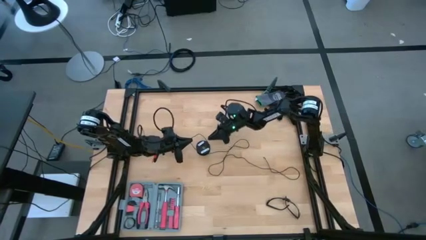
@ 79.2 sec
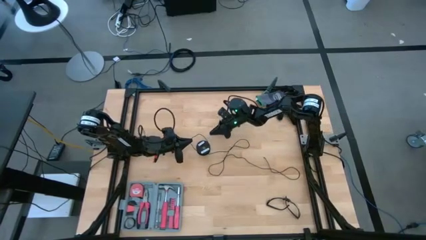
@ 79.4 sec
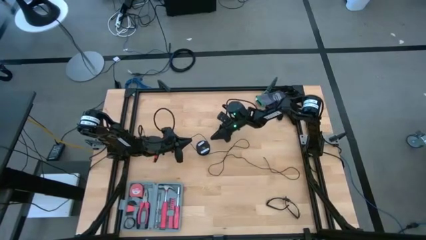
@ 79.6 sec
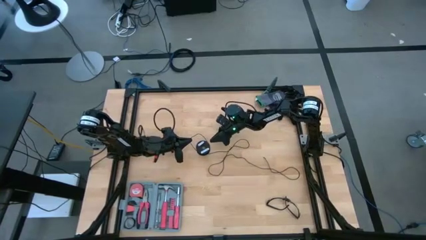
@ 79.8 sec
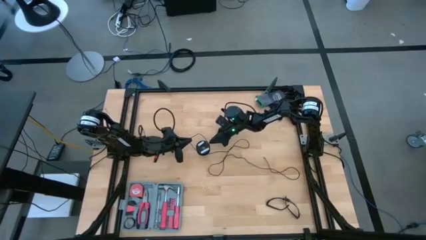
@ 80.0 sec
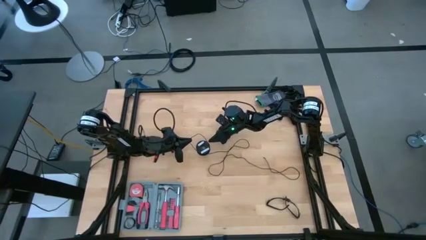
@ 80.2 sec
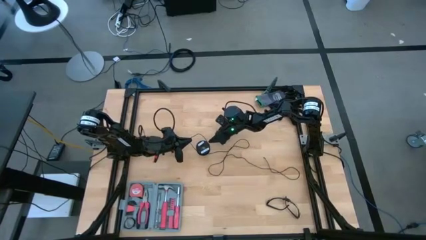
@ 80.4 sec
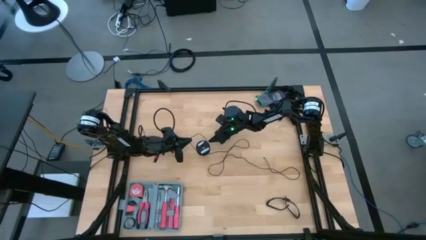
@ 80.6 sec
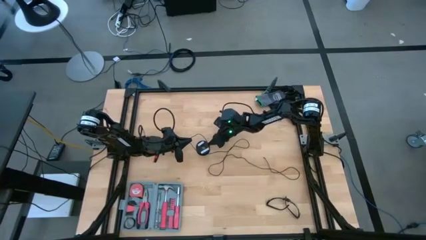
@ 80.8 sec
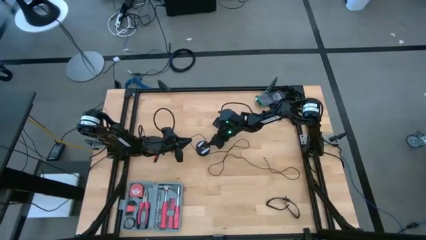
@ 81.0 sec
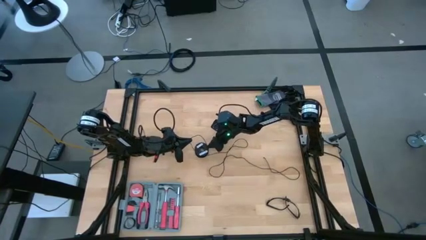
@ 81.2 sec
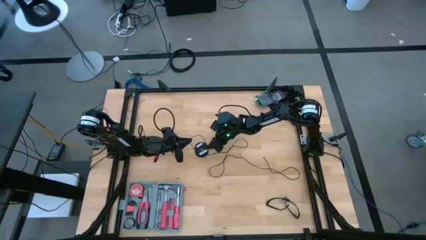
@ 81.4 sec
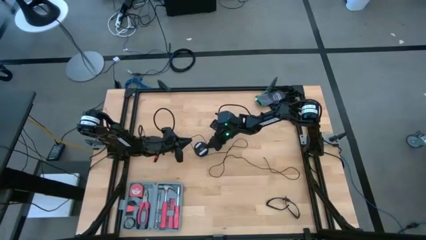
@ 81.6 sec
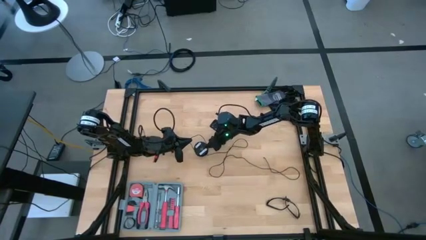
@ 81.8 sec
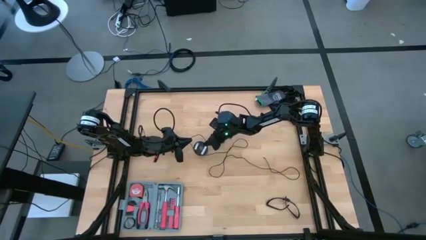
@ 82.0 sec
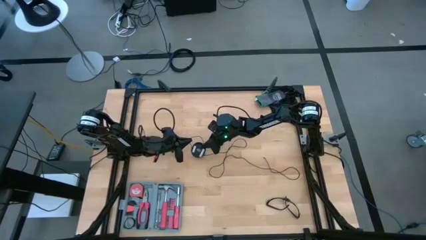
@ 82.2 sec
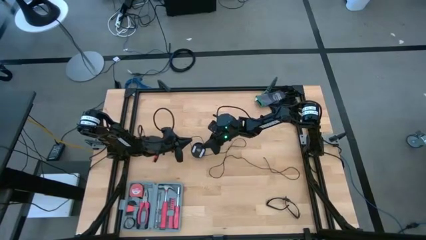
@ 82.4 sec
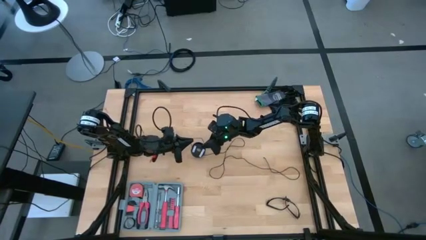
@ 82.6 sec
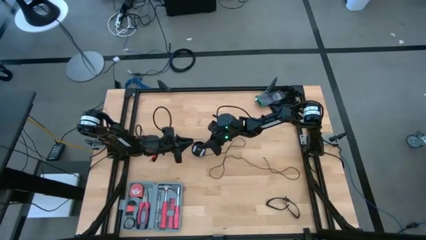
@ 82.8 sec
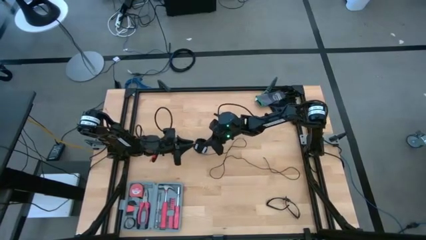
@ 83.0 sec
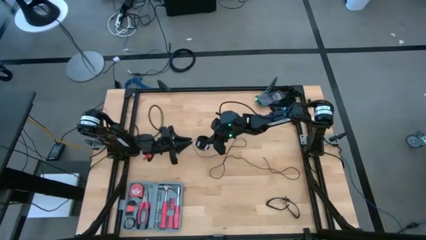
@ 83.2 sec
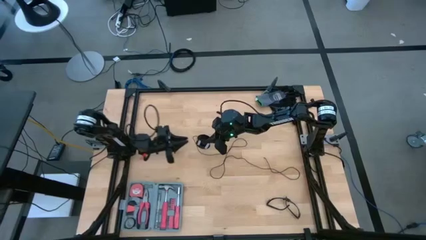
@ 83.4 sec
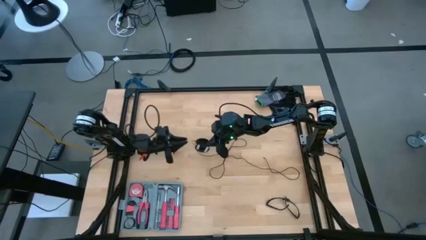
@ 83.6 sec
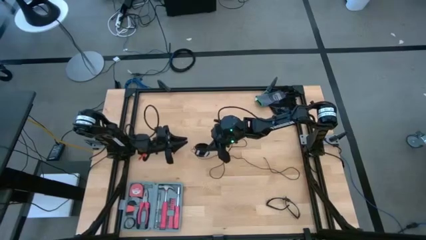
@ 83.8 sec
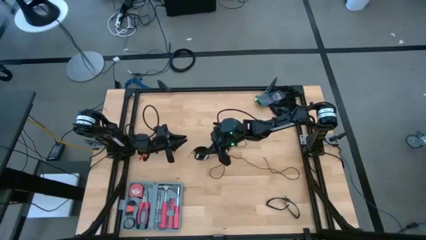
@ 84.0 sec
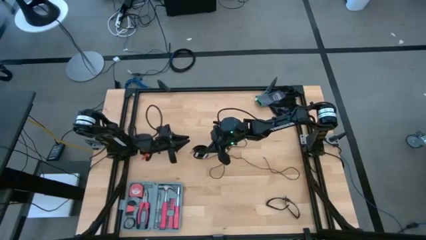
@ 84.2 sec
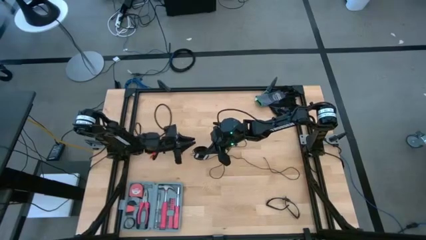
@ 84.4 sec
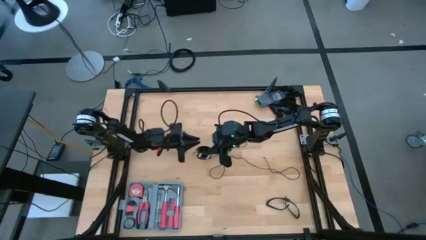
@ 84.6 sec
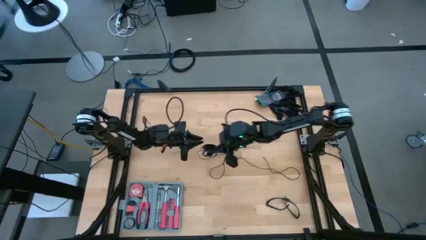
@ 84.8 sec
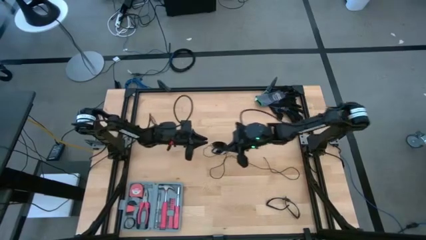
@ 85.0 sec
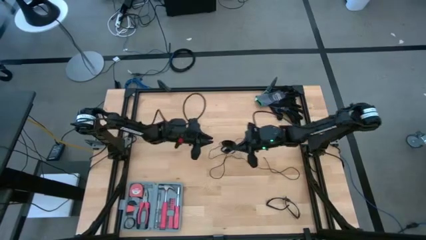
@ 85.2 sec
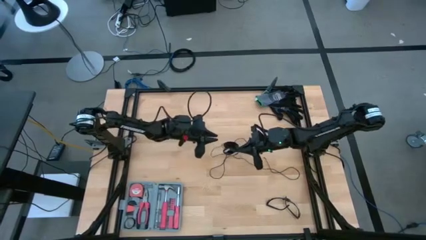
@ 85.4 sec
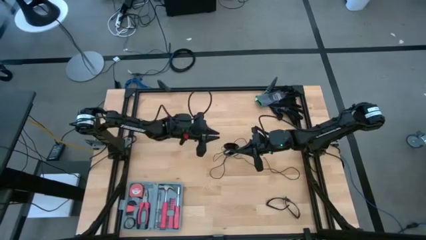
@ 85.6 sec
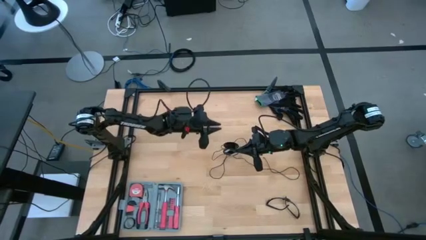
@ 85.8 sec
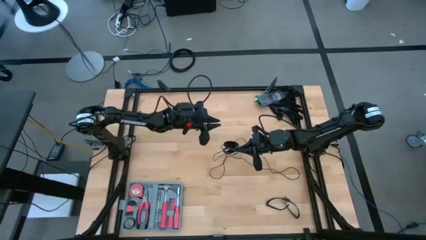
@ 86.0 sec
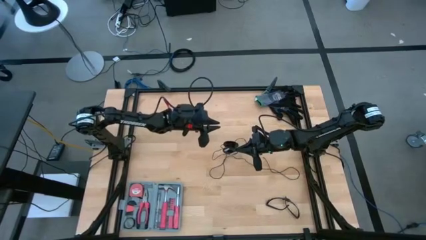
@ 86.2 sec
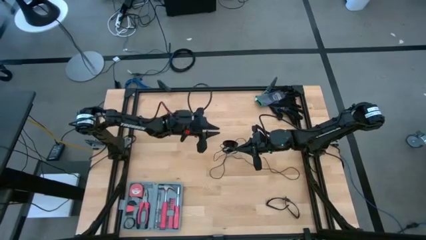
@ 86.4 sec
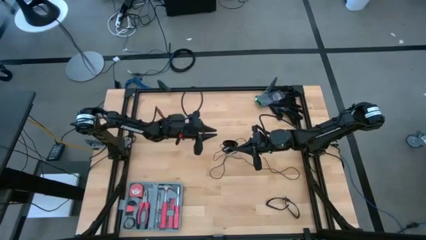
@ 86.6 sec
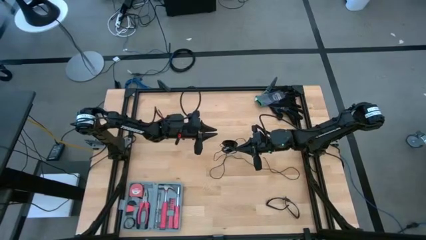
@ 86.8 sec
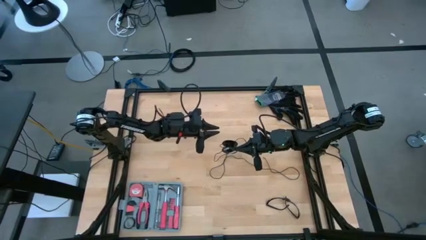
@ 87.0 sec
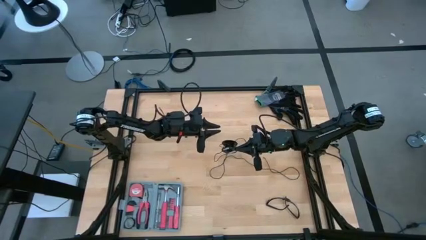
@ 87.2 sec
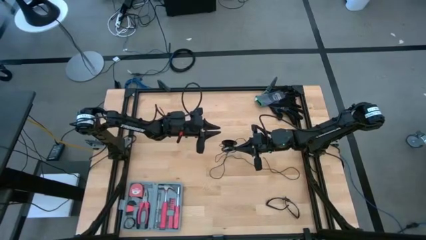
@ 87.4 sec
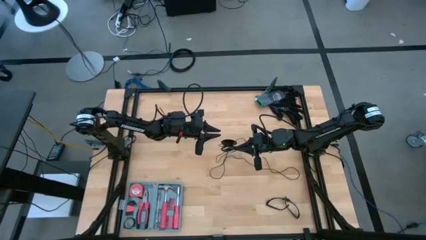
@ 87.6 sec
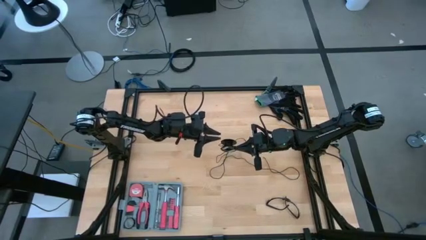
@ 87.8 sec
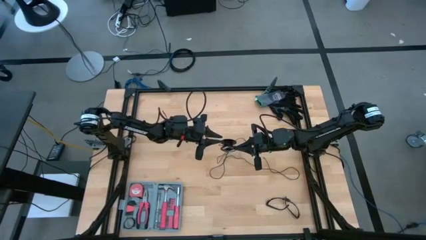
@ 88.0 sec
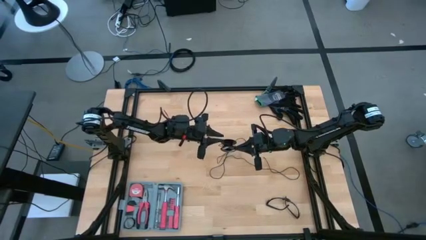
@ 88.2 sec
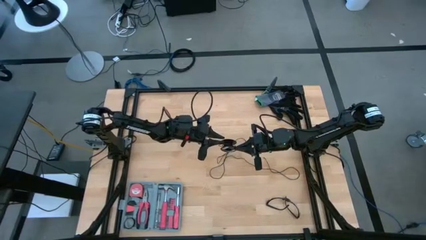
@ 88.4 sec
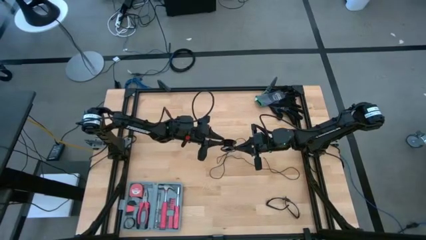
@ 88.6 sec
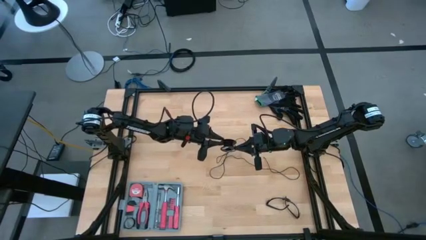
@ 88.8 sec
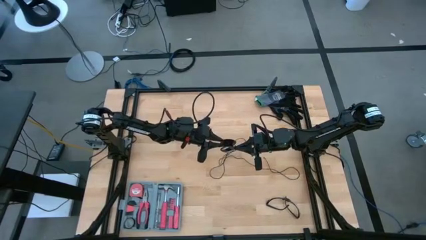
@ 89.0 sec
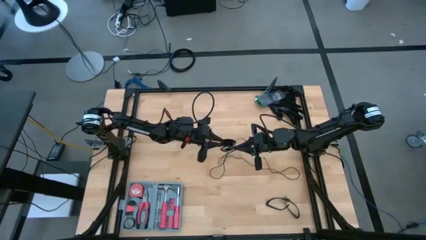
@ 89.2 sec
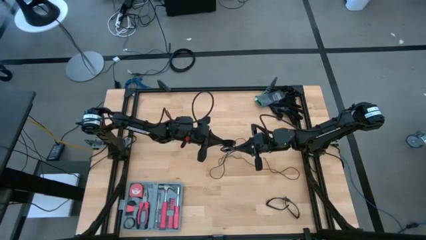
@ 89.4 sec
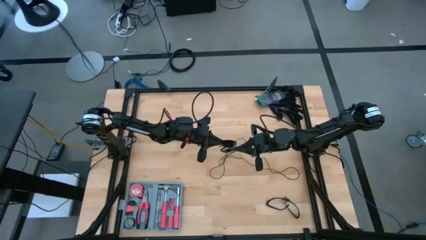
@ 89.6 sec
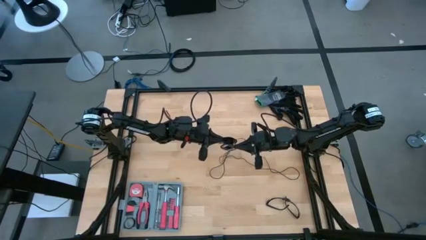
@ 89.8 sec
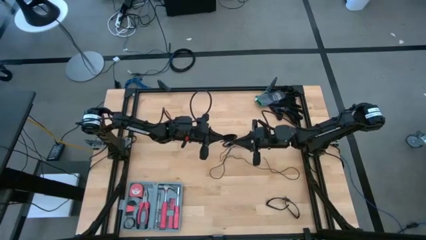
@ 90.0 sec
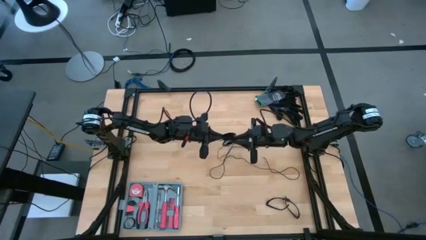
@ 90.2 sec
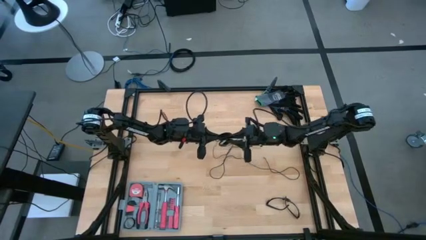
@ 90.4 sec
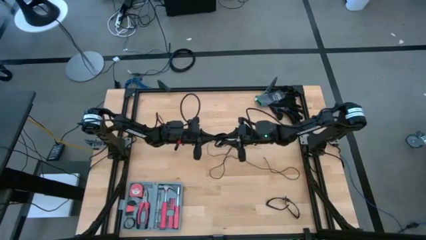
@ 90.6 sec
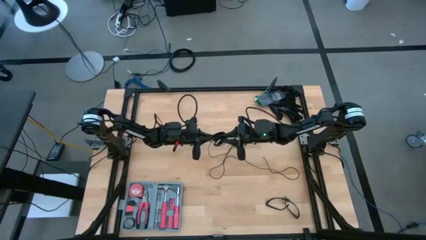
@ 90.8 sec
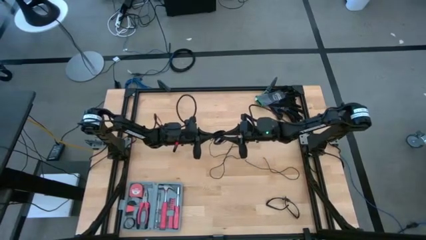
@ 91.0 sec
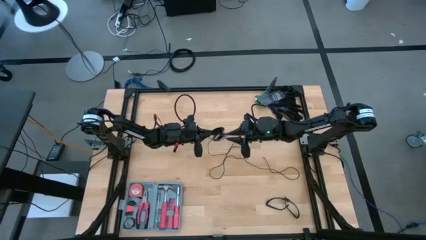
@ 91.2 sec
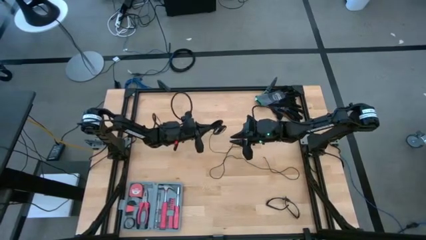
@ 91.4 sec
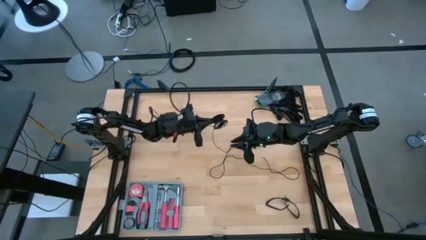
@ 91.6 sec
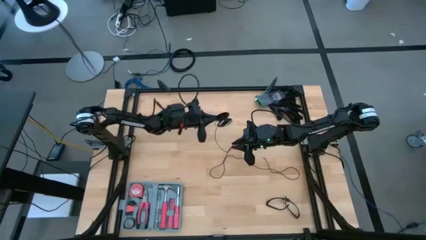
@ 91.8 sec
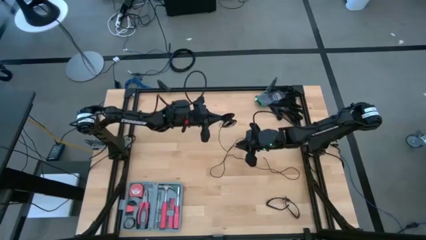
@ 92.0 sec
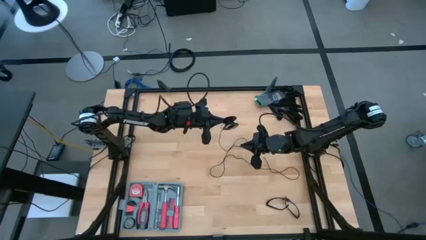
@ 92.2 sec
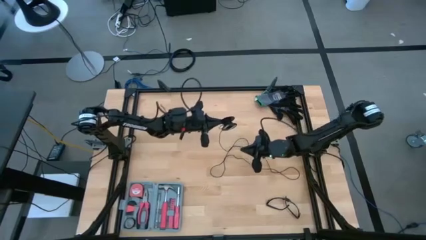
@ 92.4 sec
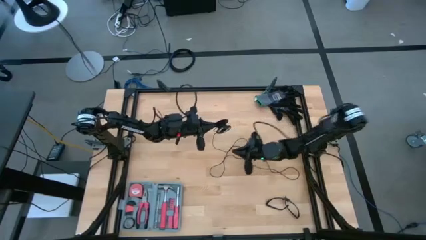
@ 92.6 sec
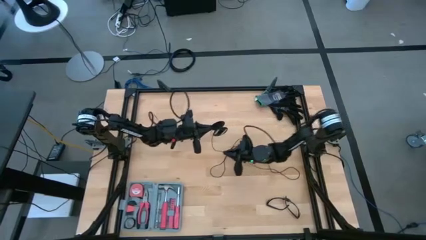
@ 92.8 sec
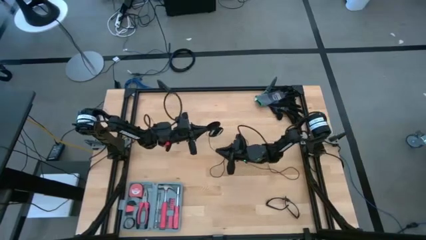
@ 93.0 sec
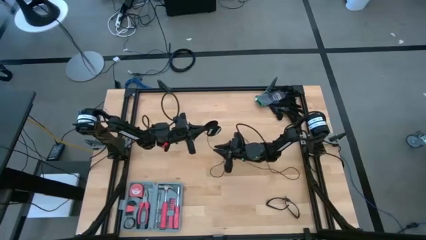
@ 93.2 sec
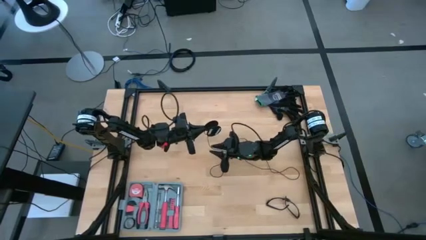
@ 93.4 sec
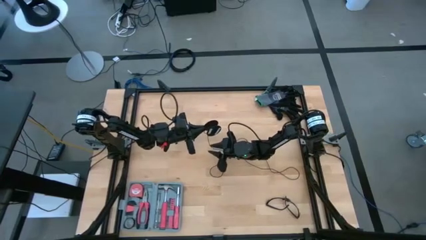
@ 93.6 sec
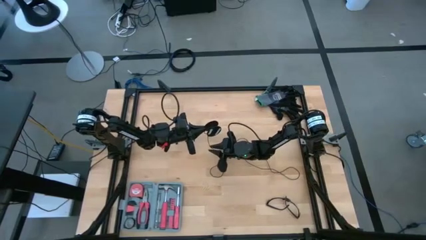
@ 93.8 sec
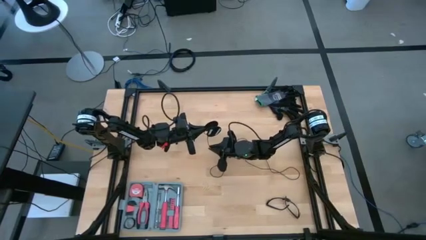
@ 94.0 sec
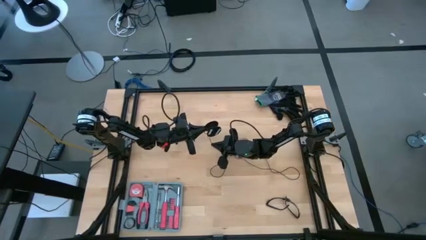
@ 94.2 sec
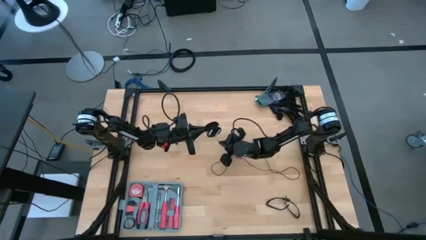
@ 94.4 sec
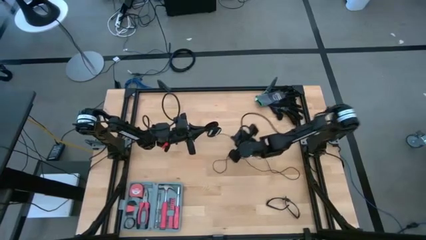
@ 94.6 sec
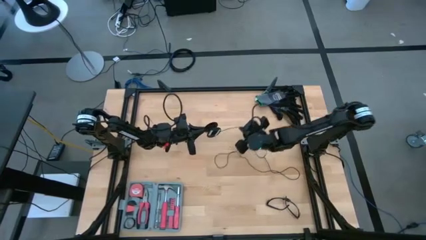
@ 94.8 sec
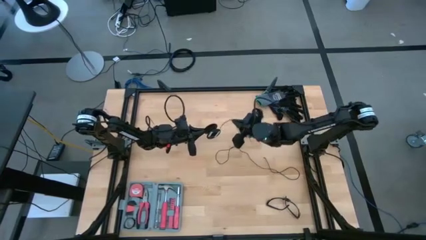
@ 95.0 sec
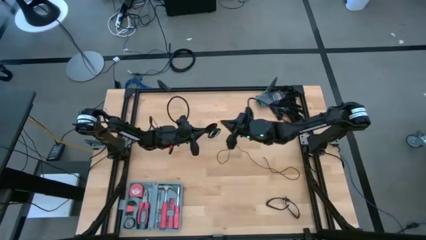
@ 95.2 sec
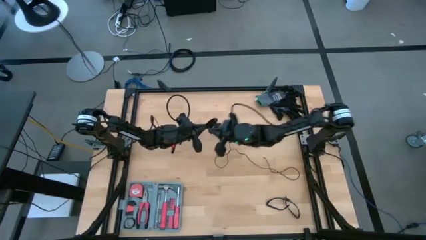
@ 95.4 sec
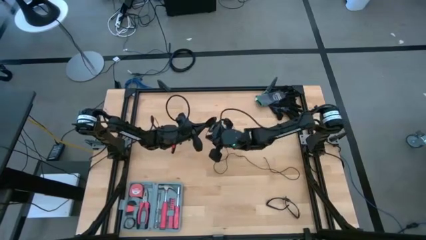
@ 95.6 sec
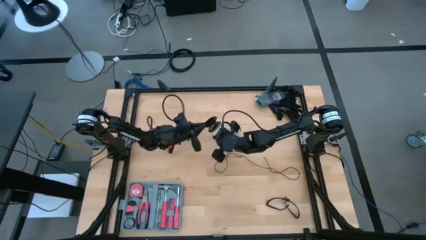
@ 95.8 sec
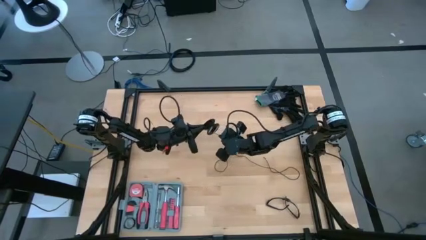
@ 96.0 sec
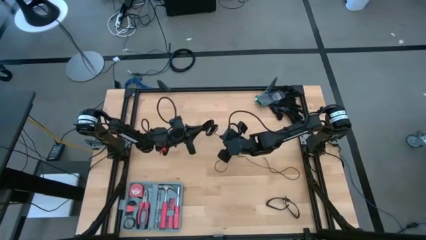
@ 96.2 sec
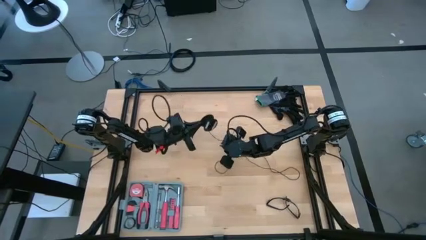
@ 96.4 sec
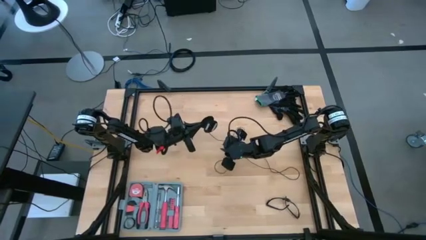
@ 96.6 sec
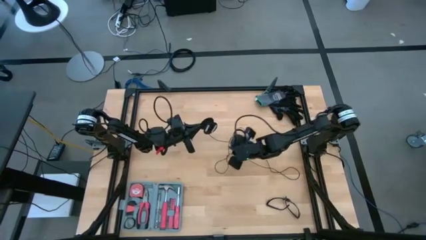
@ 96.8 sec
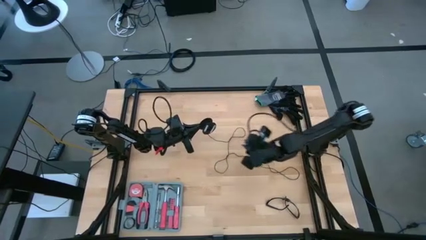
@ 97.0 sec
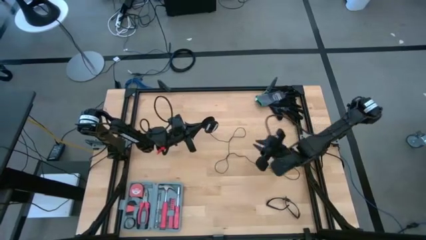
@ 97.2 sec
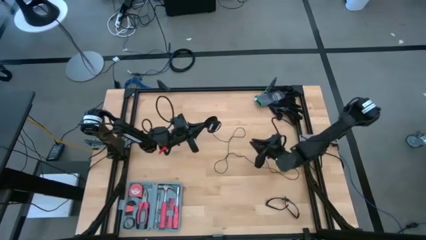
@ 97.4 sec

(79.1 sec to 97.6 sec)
Task: Coil cords
Coil the black wire onto the spool
